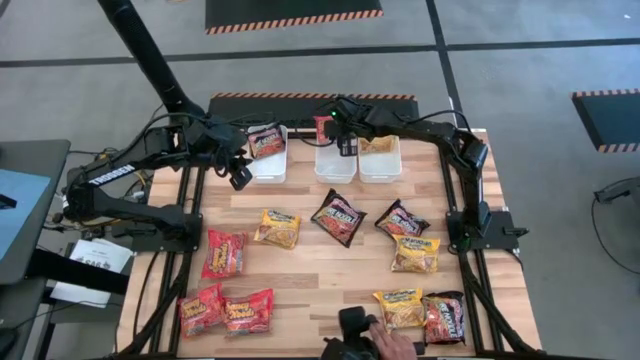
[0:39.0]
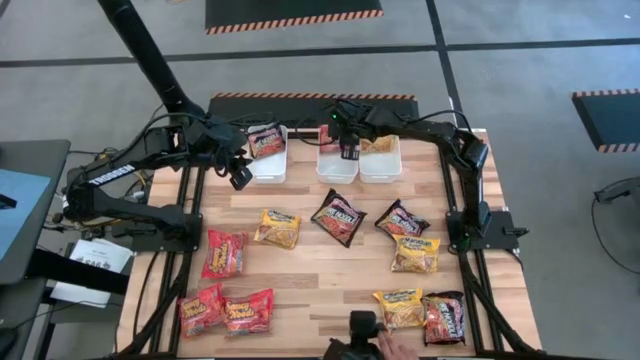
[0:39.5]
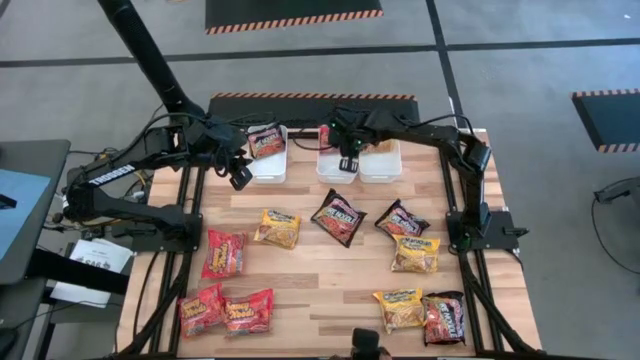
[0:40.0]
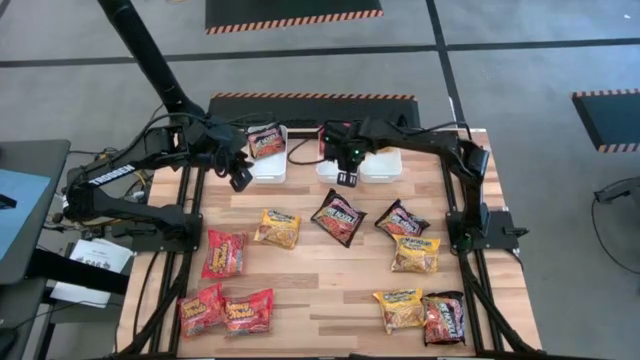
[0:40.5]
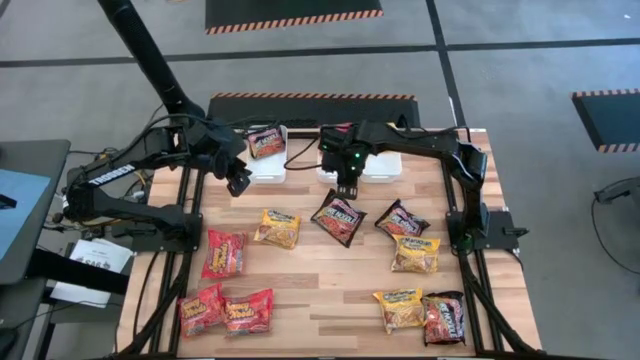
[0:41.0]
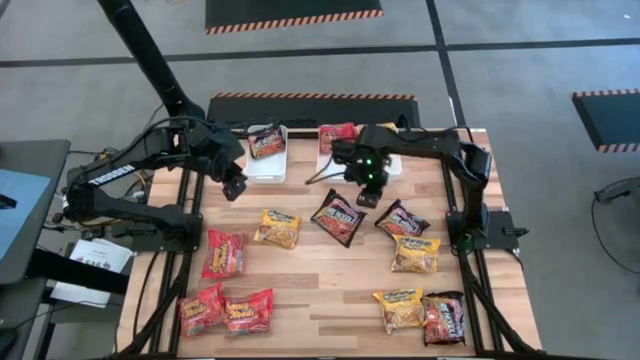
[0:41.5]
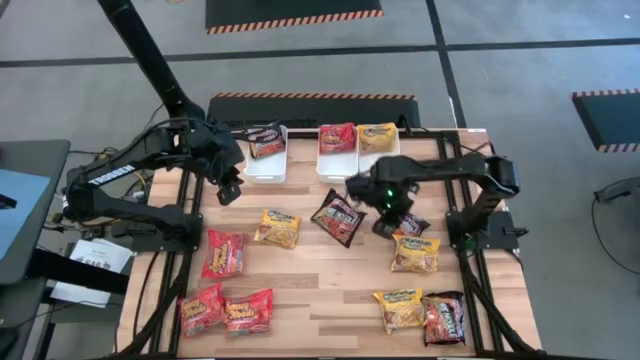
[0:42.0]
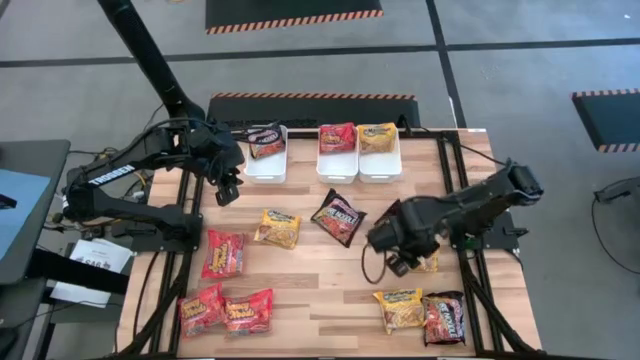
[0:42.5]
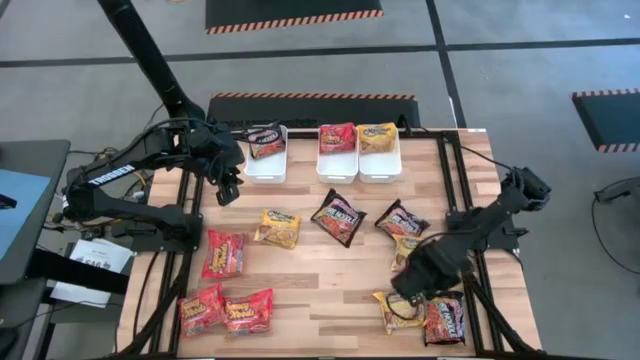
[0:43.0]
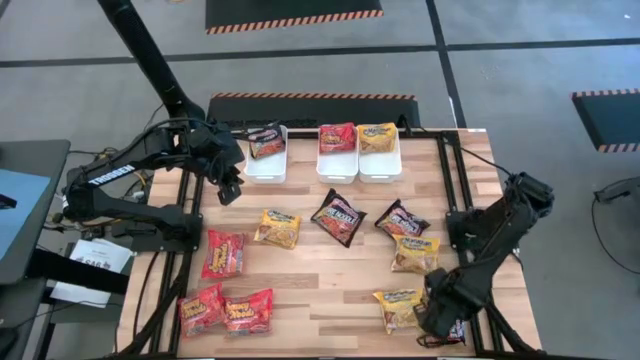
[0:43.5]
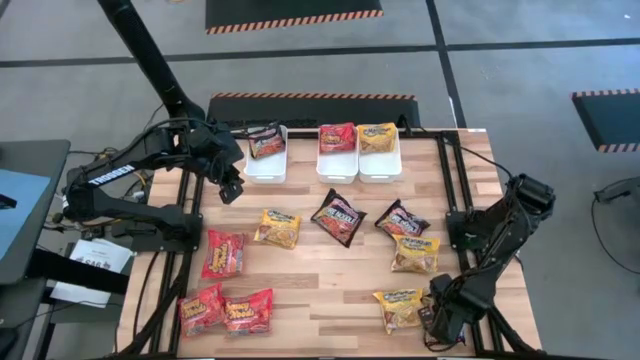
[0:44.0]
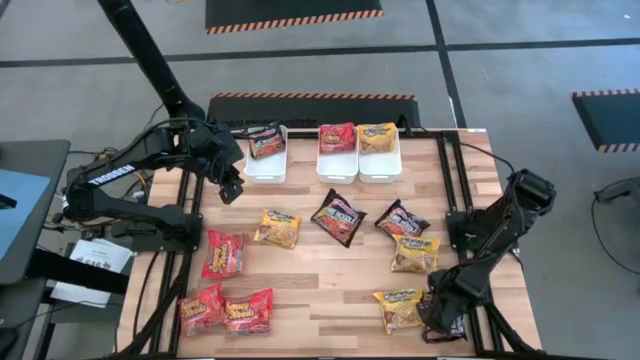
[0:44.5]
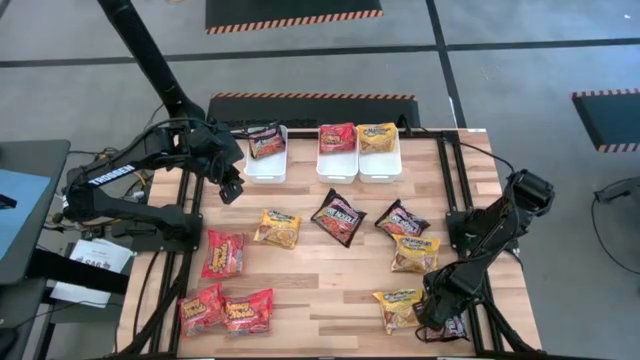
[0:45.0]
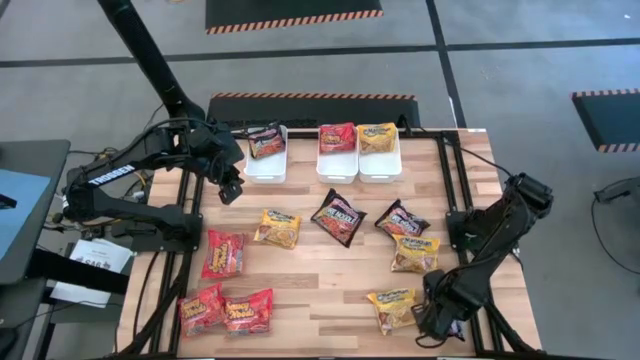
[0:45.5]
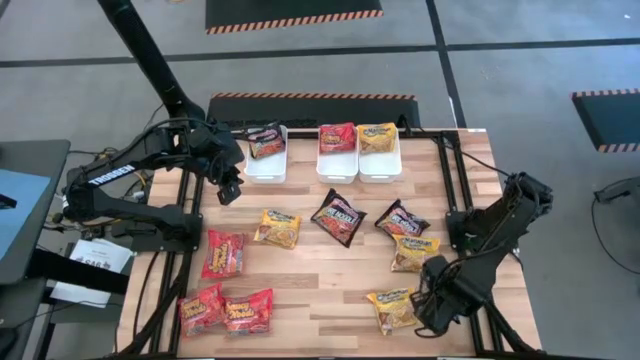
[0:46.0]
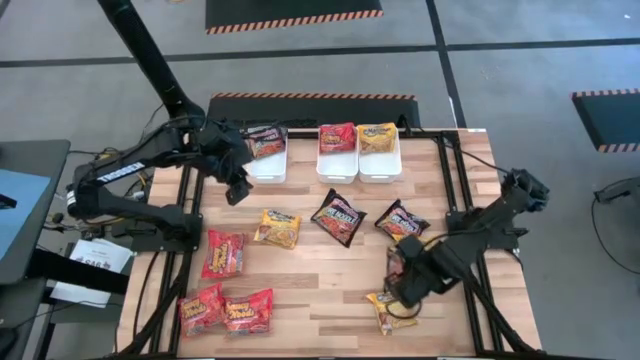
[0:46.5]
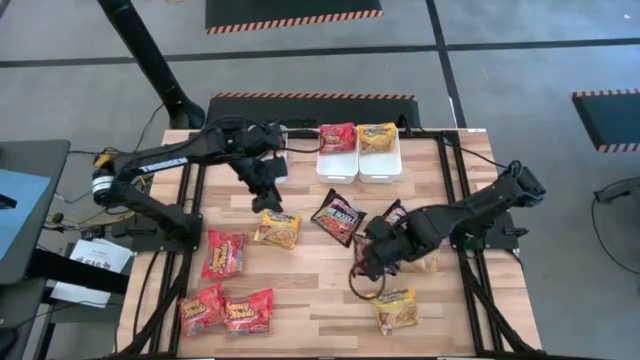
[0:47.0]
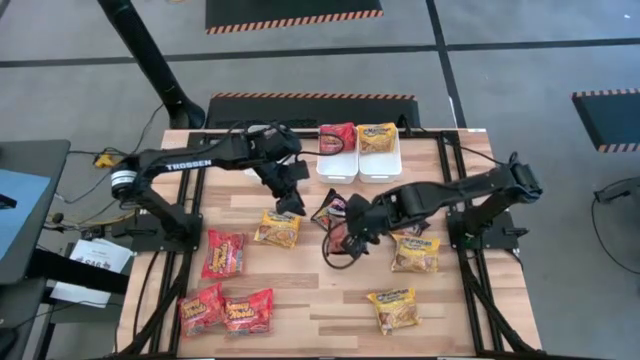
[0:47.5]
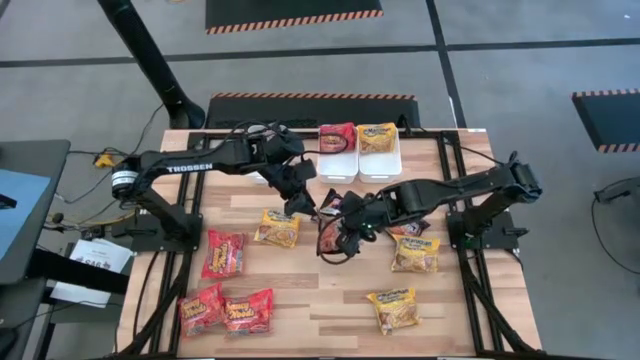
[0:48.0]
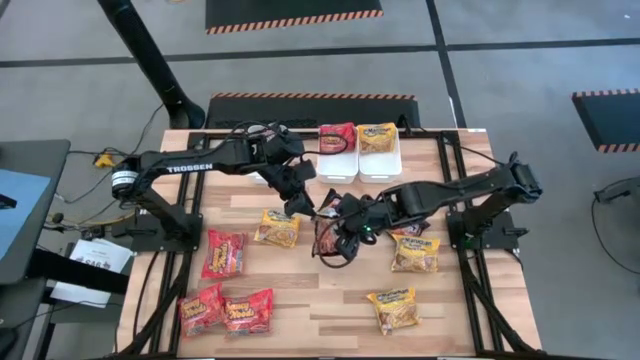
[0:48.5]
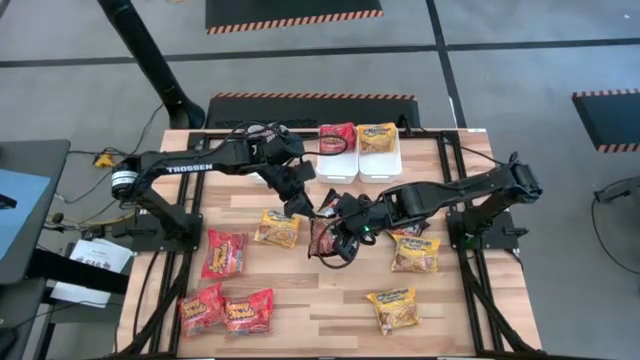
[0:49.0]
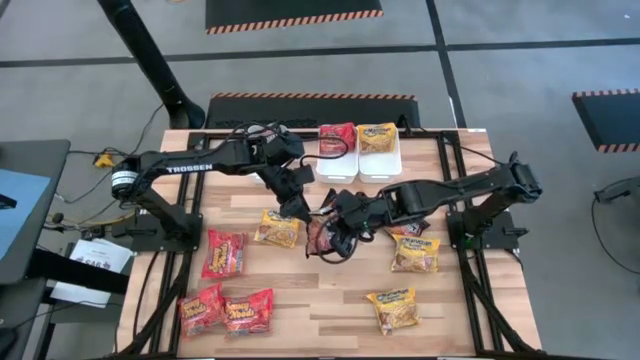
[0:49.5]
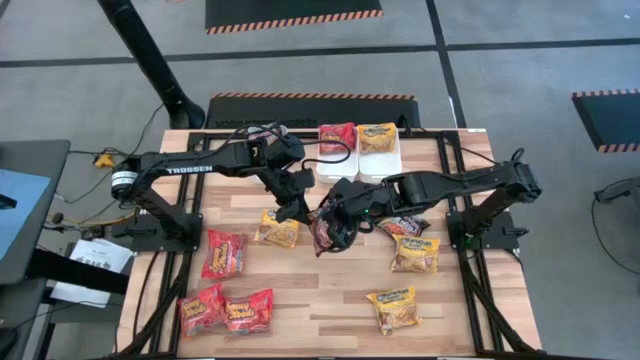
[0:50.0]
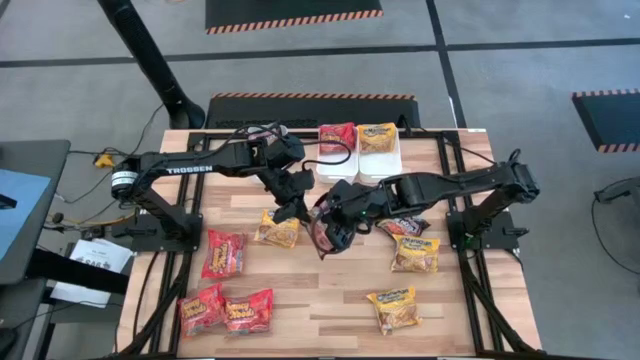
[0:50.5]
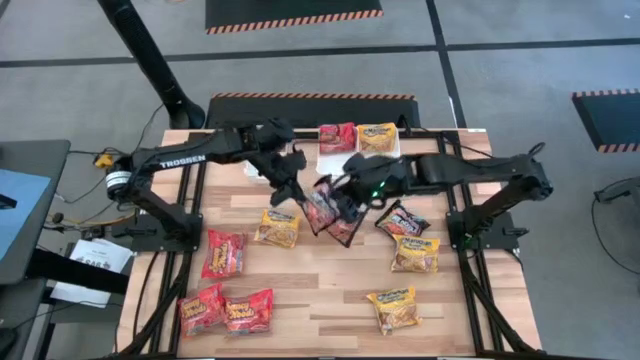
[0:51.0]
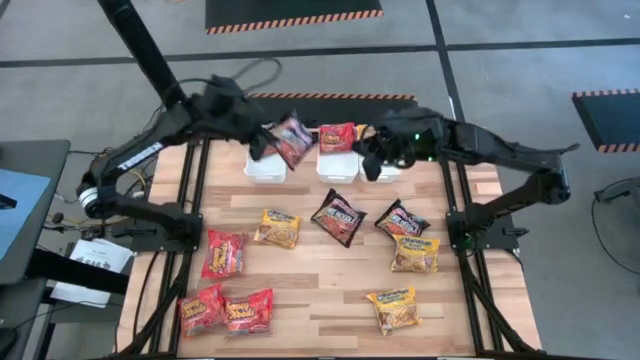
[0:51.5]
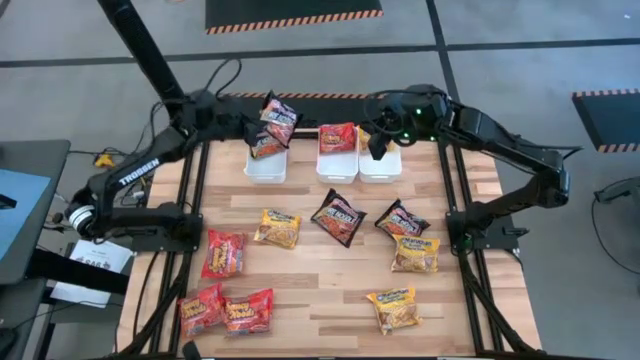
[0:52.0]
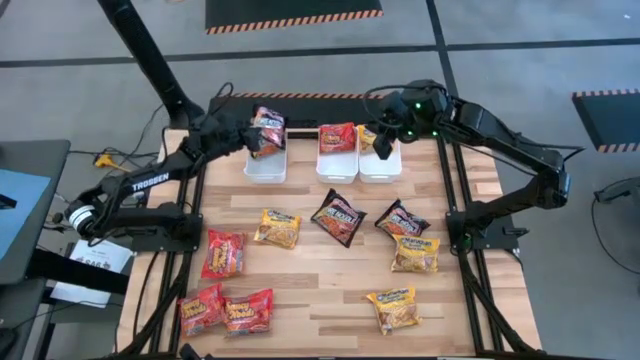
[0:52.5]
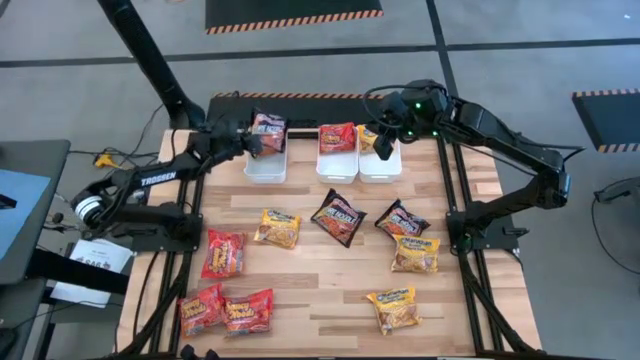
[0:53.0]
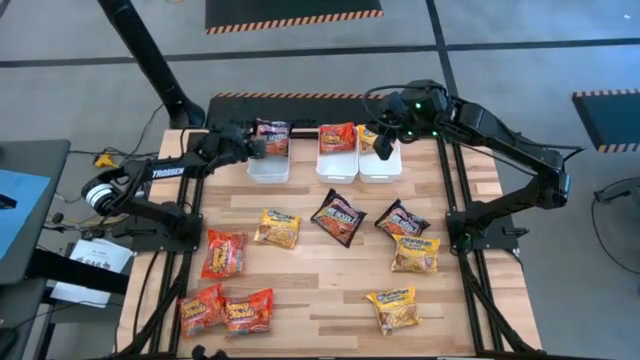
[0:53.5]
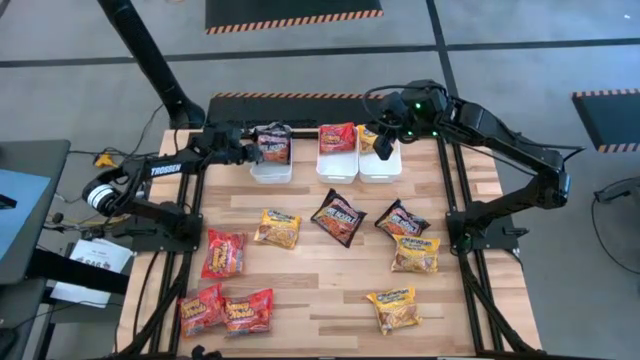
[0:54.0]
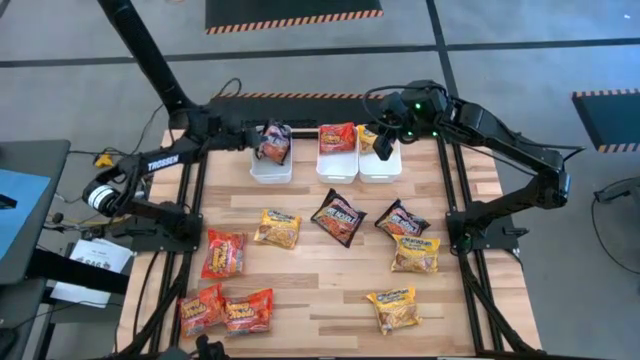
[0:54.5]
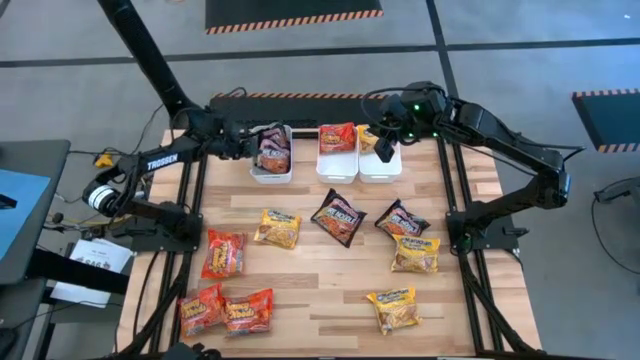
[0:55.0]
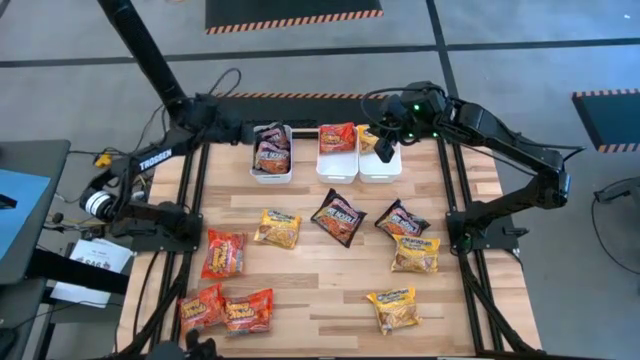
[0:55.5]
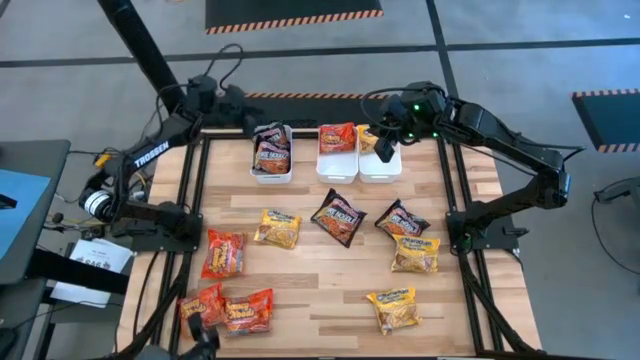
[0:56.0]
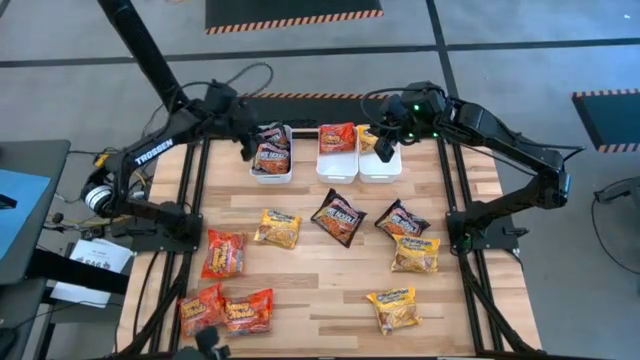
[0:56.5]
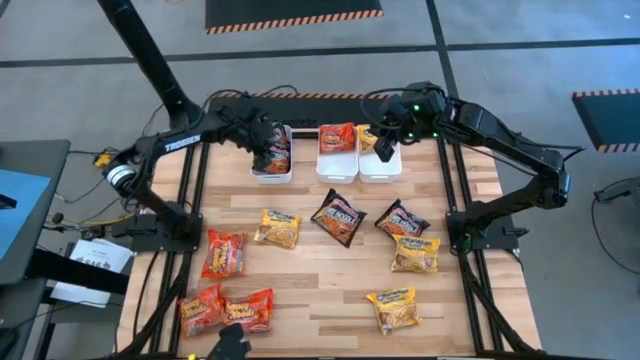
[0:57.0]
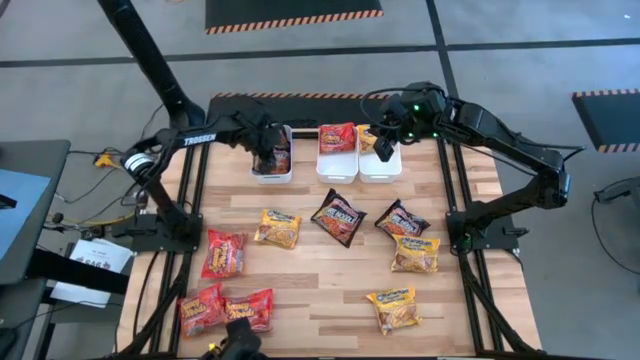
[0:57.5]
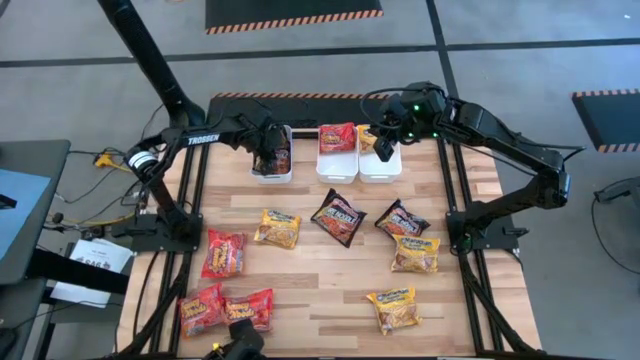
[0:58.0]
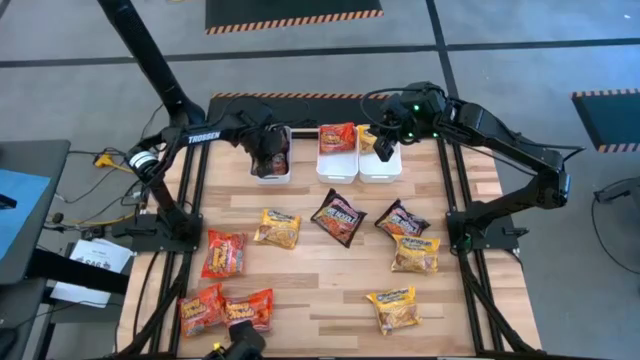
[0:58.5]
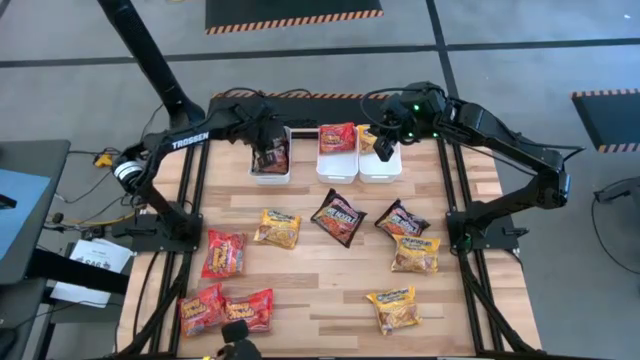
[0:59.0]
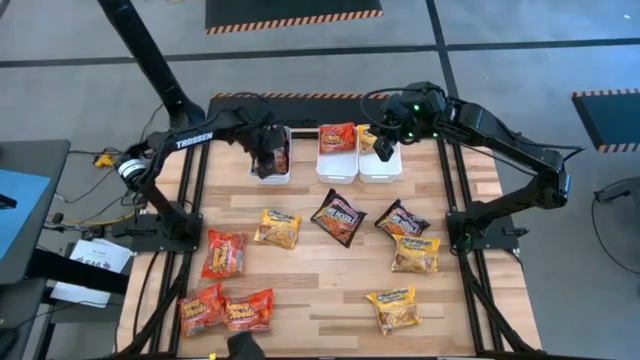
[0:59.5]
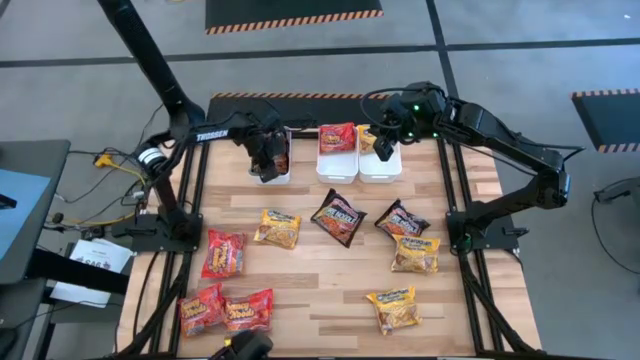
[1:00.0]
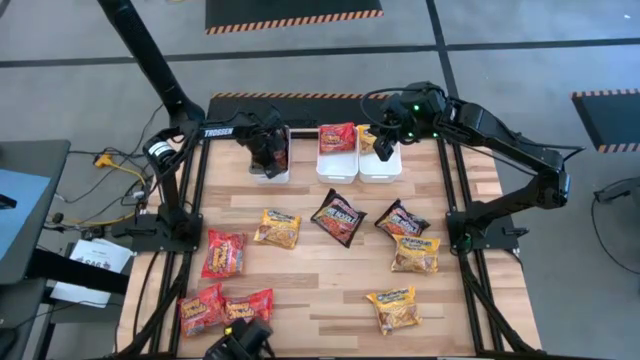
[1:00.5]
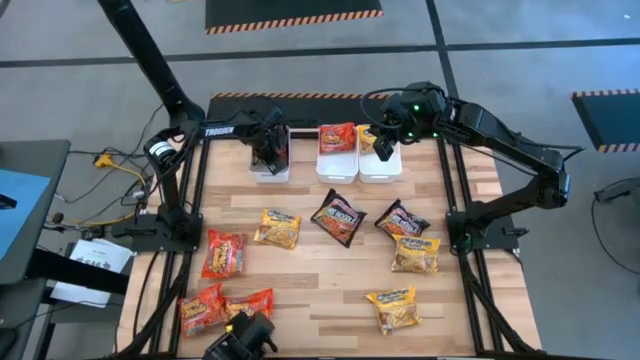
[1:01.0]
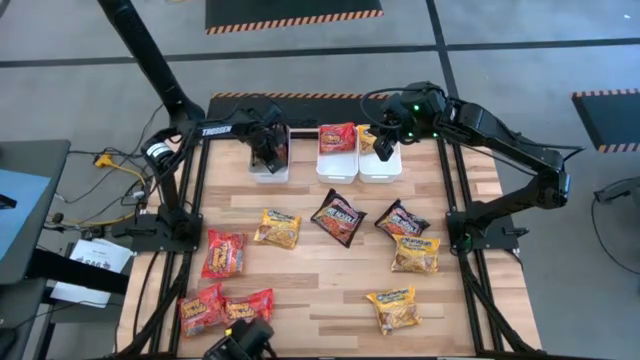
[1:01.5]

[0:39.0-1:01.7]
Task: Sort Maruchan noodles
Put the black noodle pack into the left white bin
